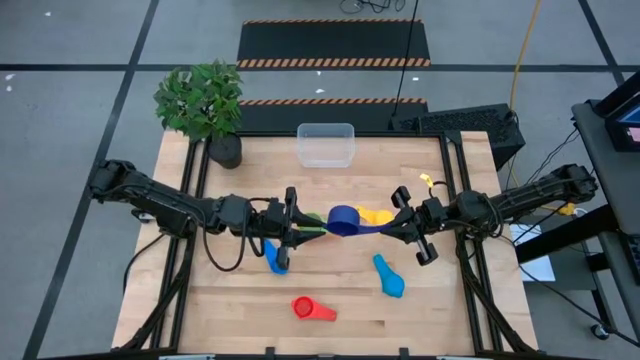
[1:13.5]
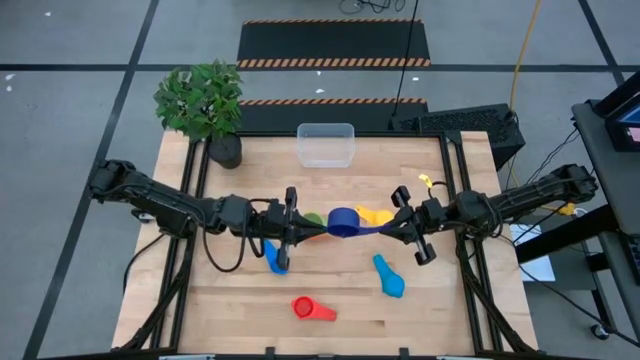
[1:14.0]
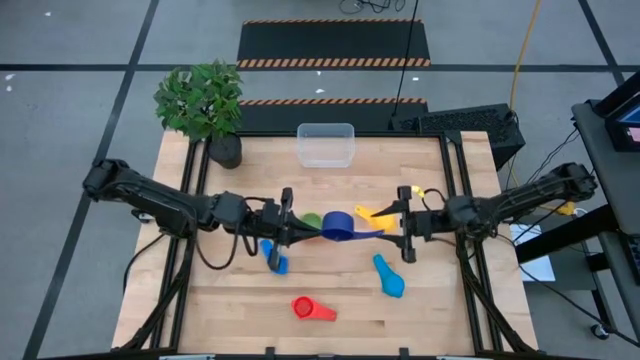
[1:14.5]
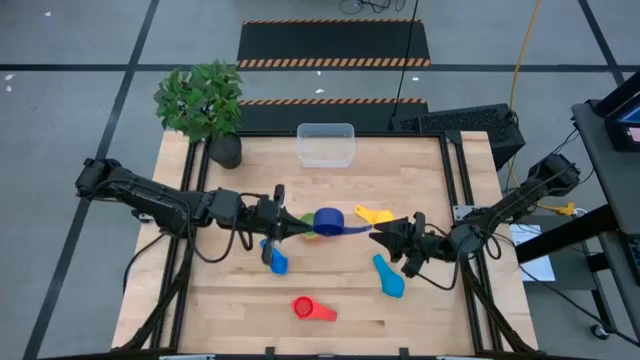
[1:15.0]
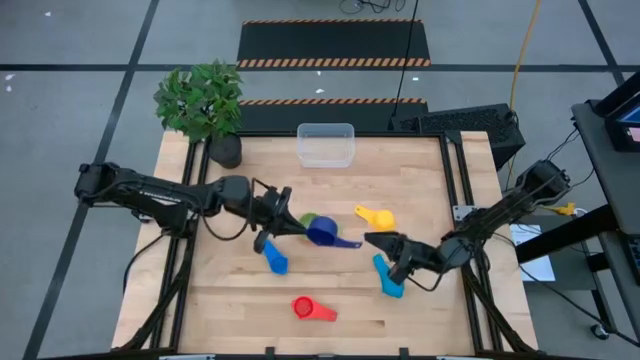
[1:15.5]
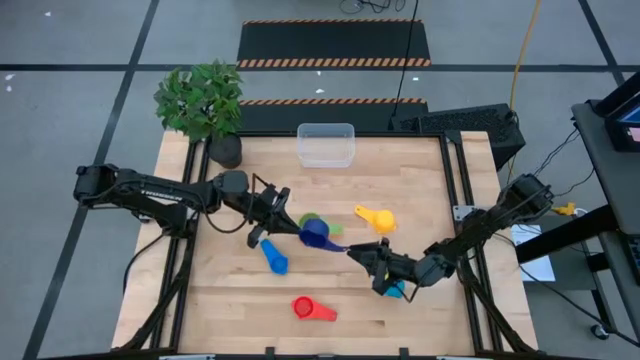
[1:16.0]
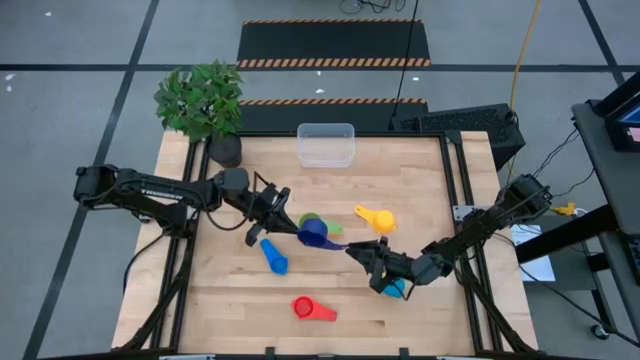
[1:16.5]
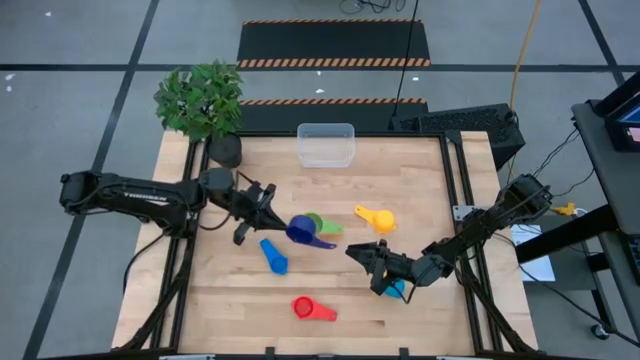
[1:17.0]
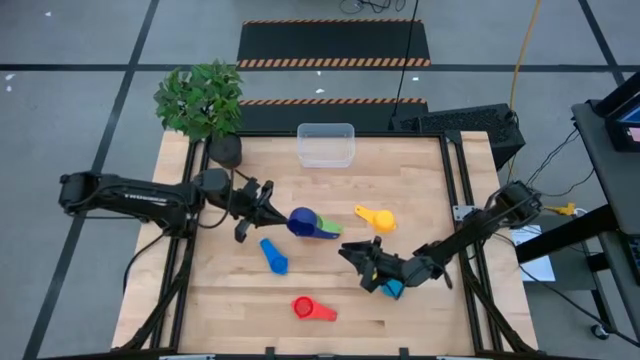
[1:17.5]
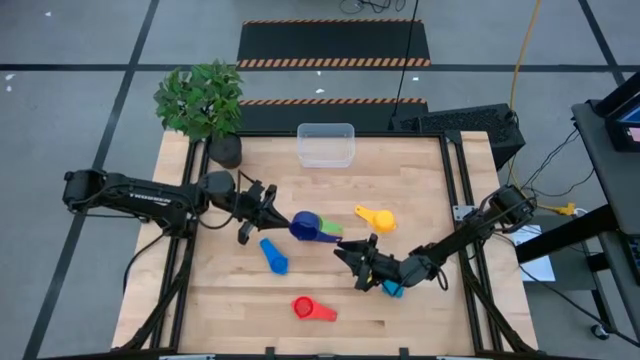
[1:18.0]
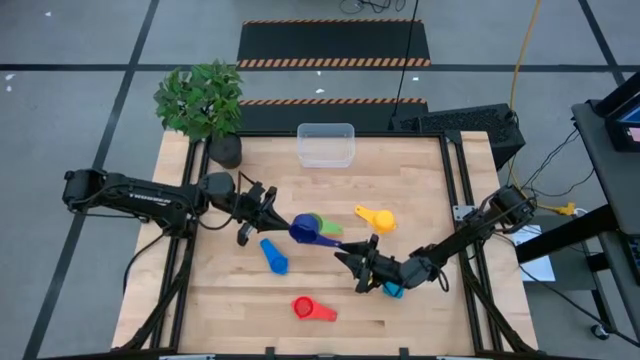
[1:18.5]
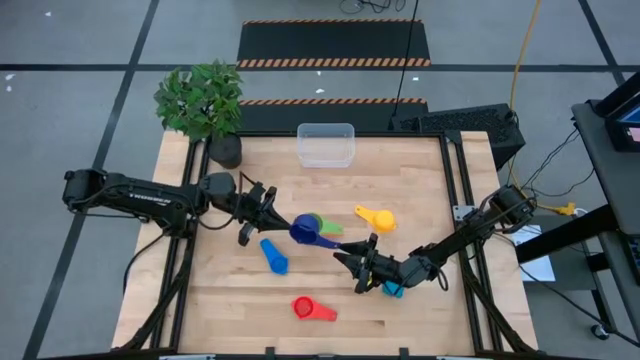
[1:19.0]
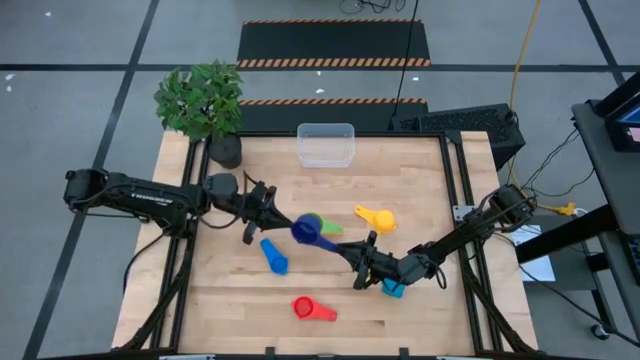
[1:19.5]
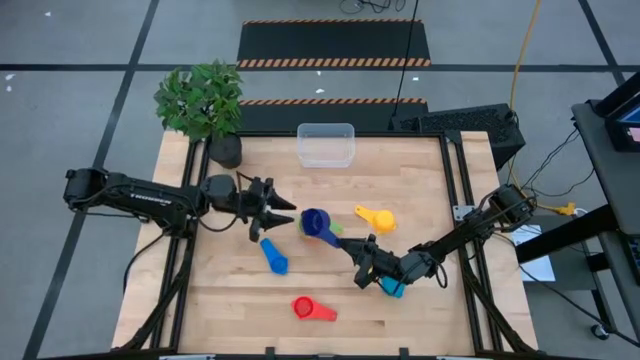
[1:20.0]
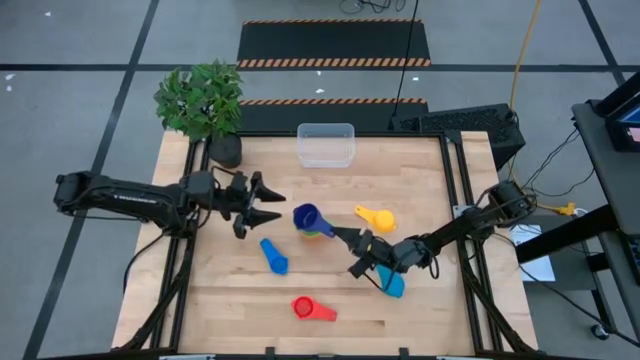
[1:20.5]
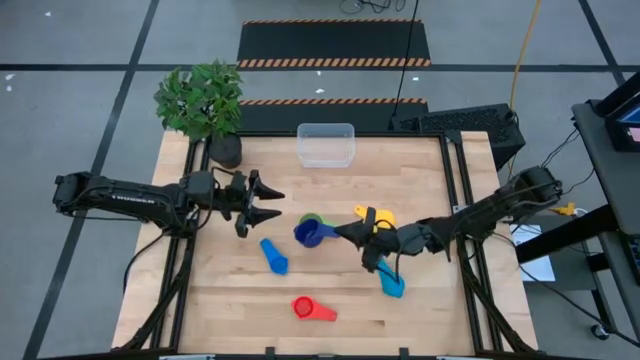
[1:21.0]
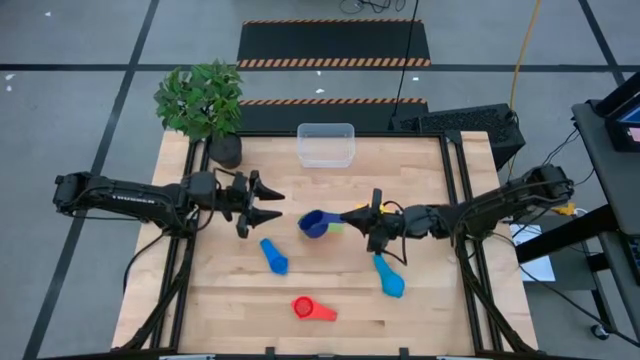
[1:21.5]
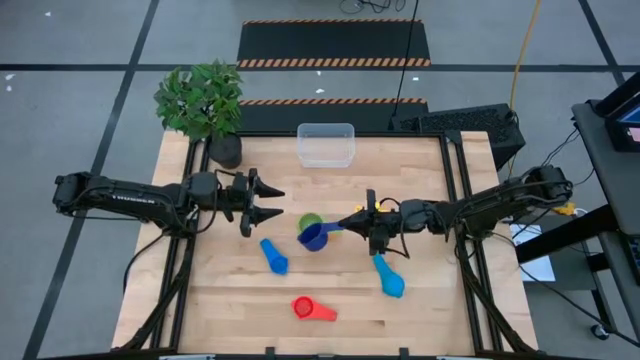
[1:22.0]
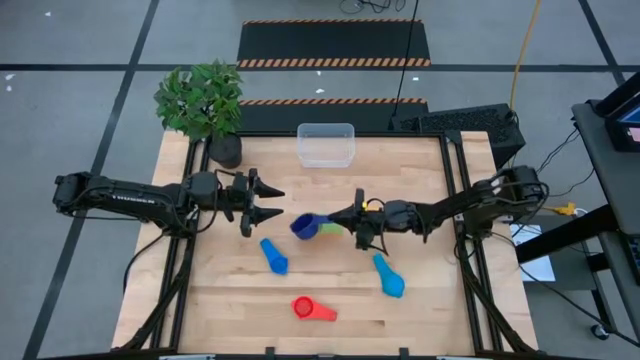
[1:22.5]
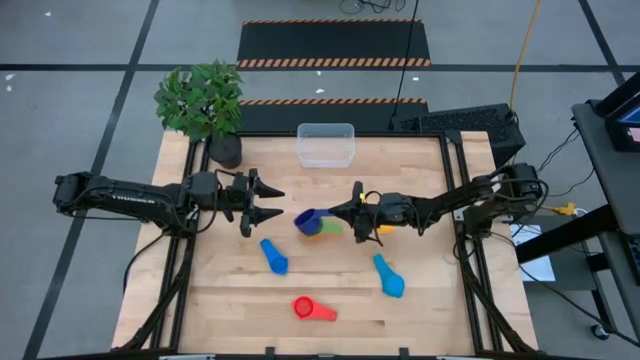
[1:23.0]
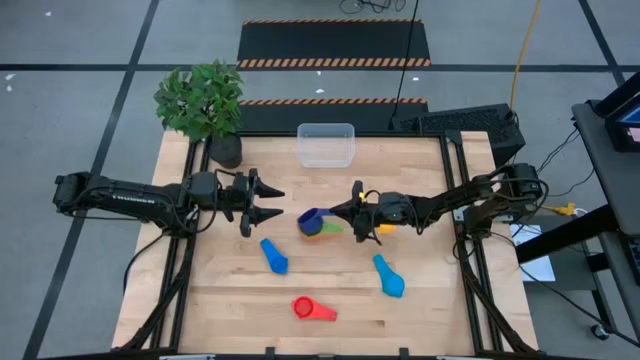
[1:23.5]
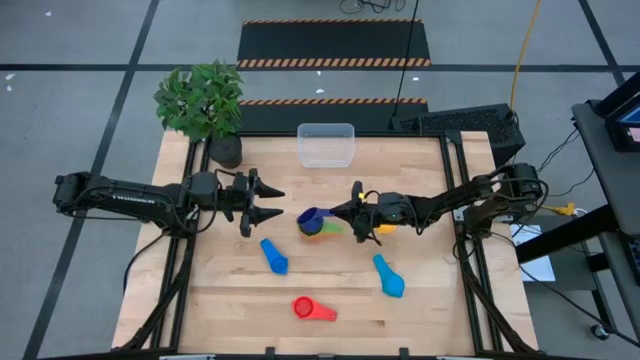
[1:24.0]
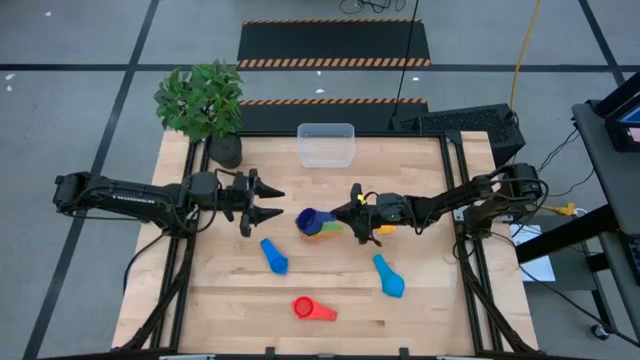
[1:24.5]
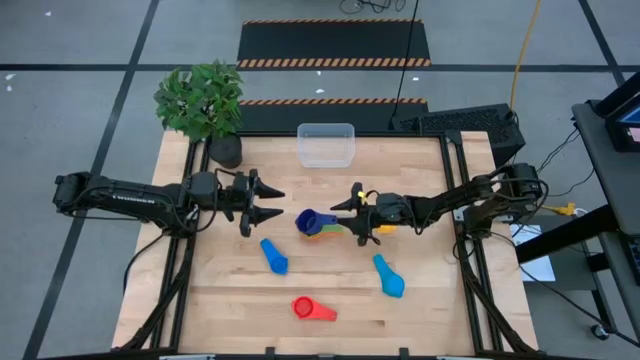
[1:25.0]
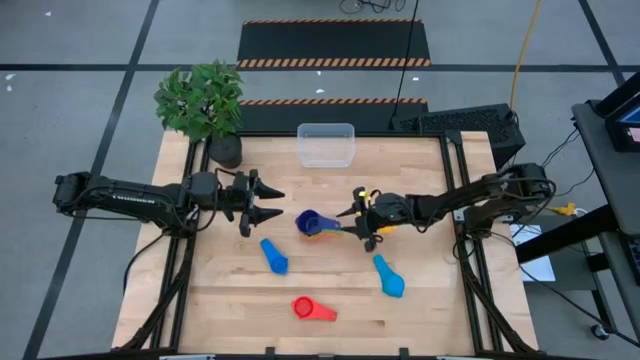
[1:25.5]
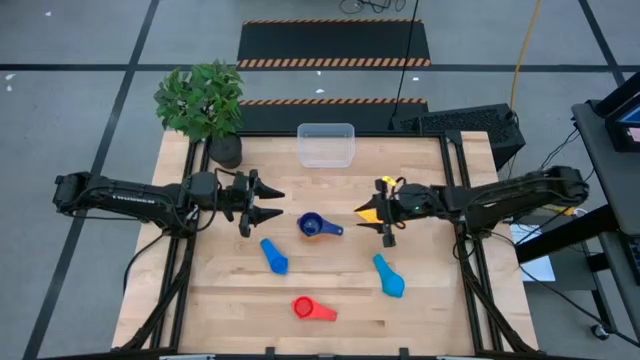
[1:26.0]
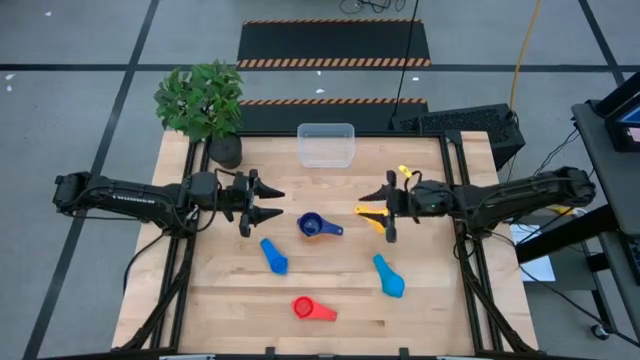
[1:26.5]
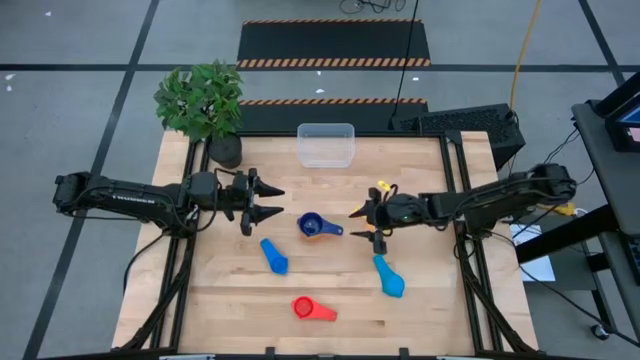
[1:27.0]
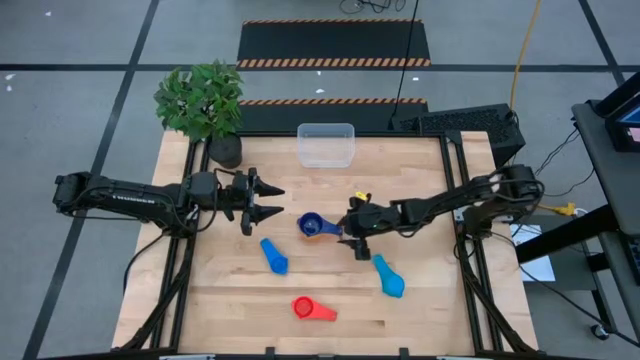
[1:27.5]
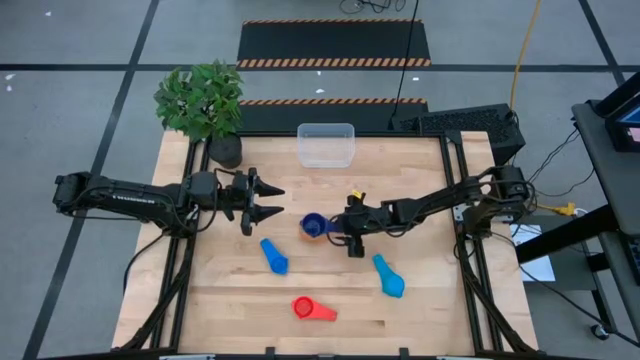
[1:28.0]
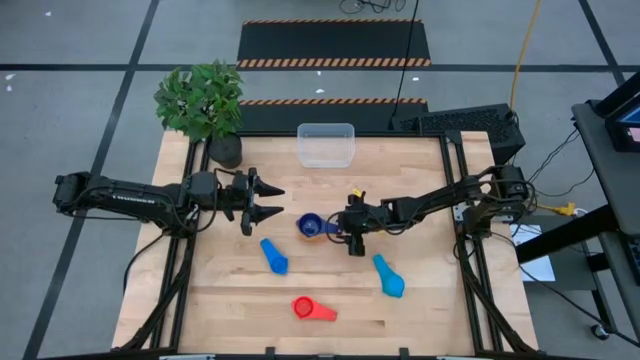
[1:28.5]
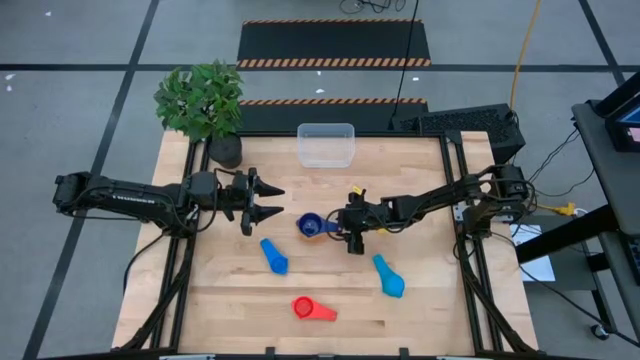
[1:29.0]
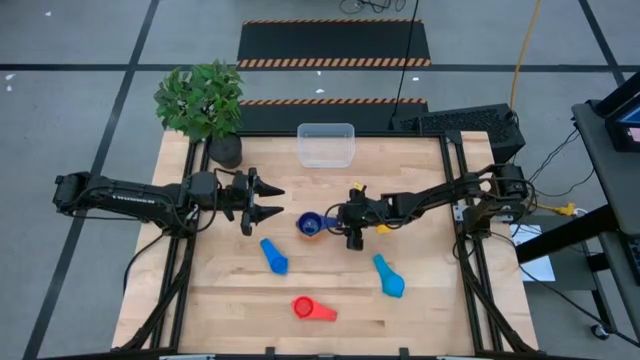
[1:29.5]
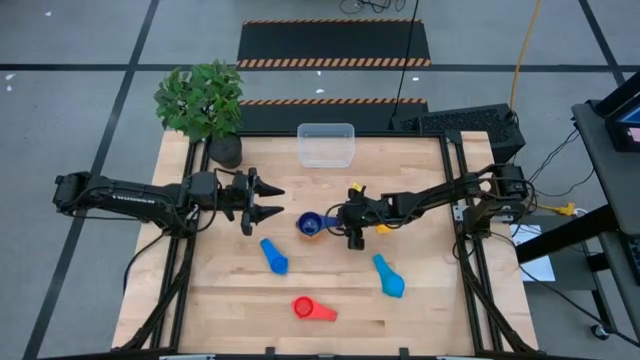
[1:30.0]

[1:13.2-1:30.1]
Task: Nest measuring cups in basket
Stack the dark blue measuring cup on top of the green measuring cup

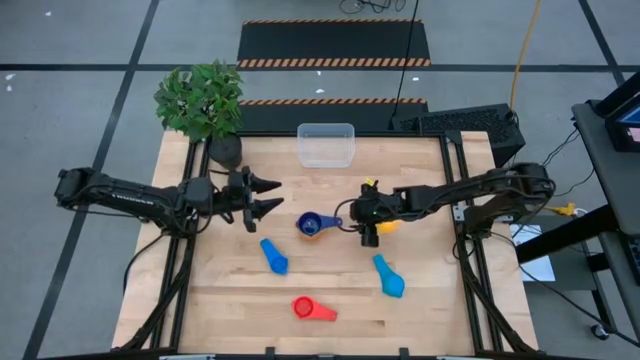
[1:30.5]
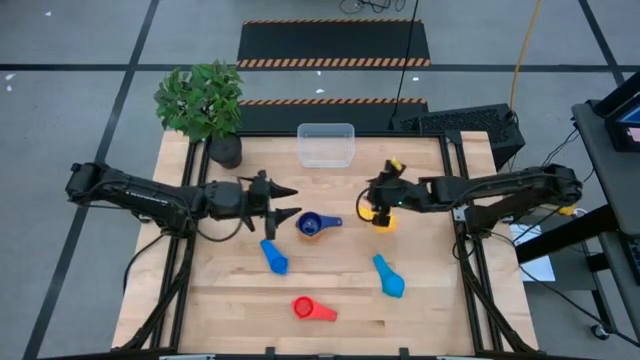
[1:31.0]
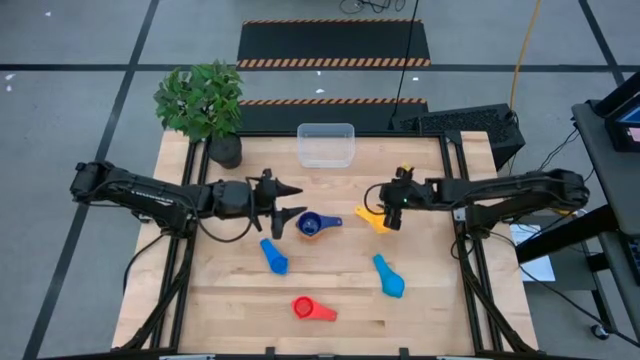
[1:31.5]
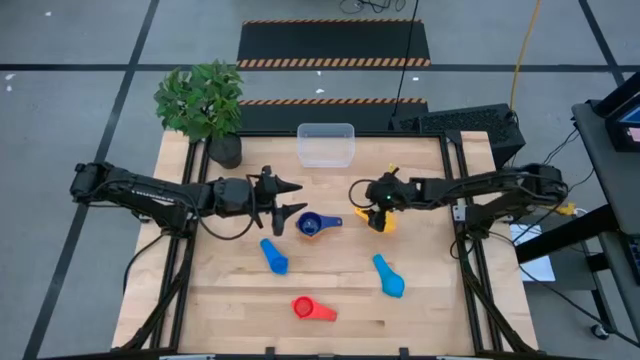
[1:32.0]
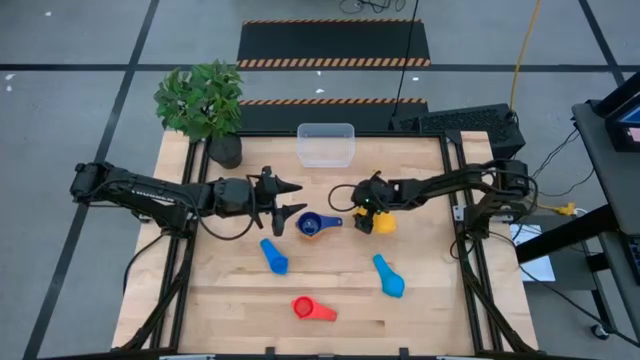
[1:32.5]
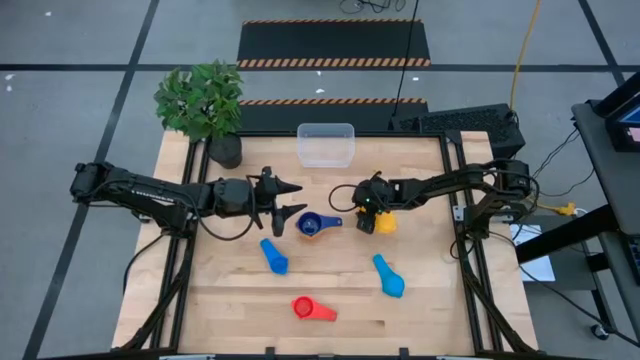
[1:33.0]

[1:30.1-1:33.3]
Stack the yellow measuring cup on top of the dark blue measuring cup
